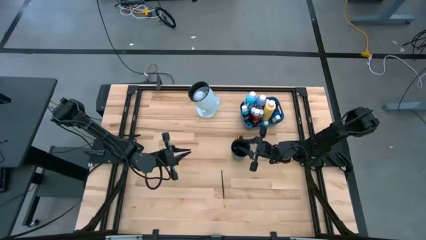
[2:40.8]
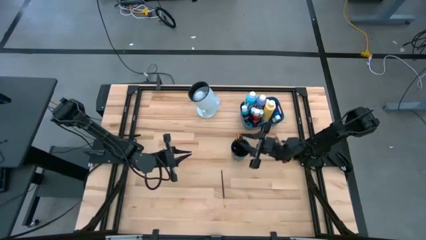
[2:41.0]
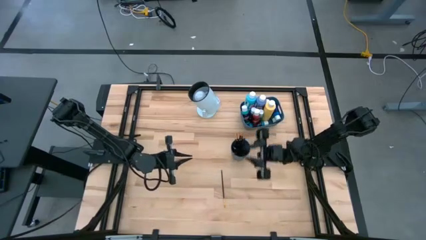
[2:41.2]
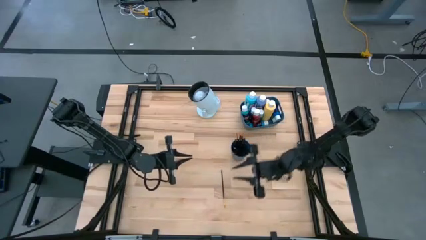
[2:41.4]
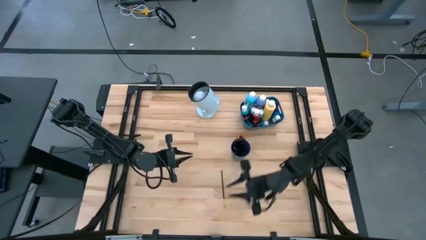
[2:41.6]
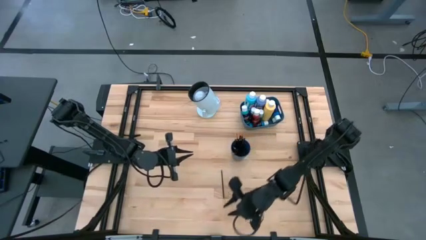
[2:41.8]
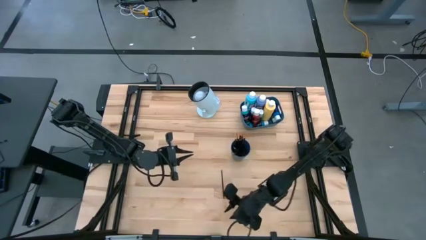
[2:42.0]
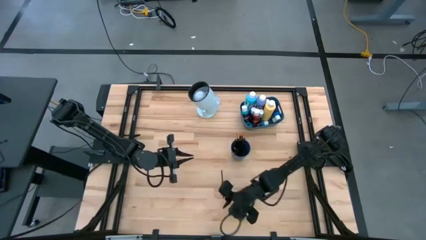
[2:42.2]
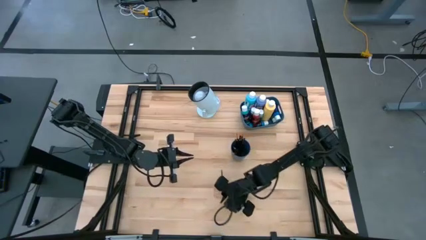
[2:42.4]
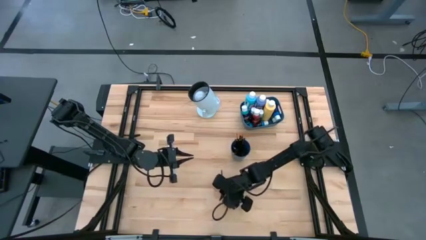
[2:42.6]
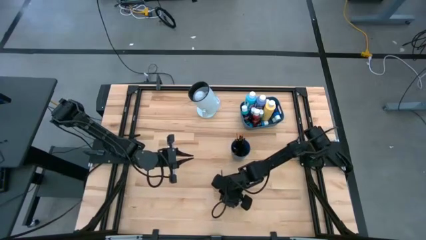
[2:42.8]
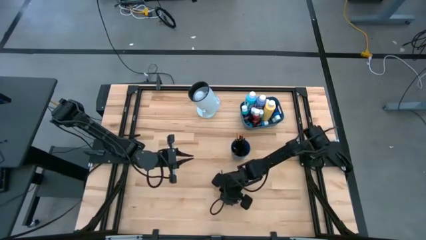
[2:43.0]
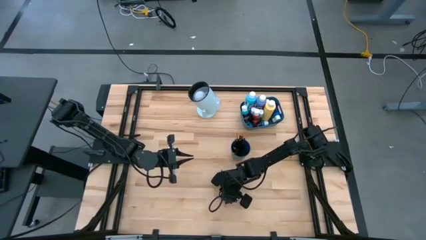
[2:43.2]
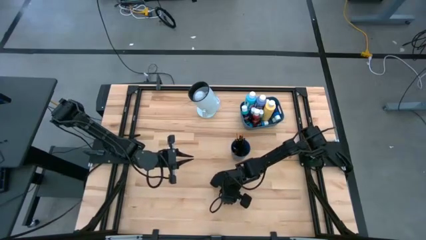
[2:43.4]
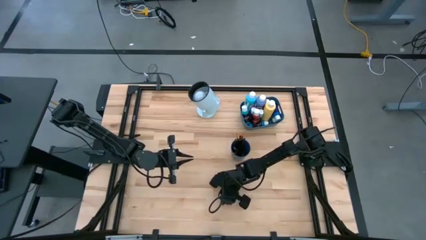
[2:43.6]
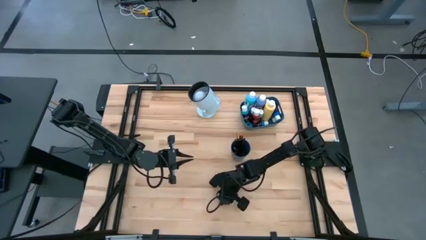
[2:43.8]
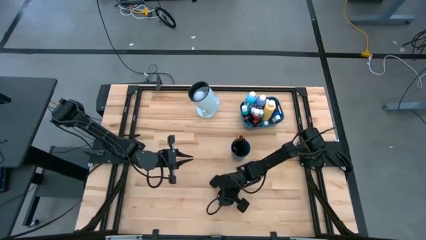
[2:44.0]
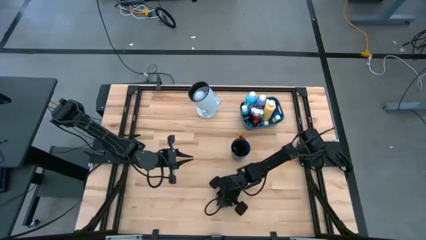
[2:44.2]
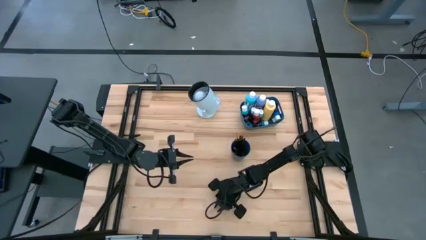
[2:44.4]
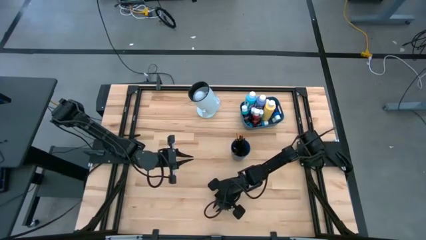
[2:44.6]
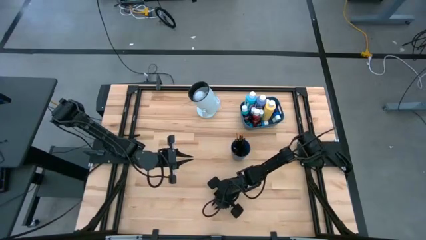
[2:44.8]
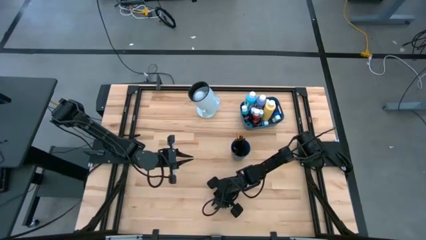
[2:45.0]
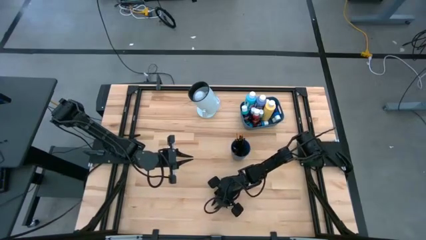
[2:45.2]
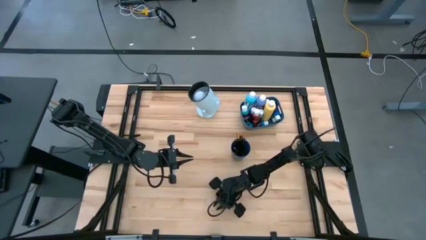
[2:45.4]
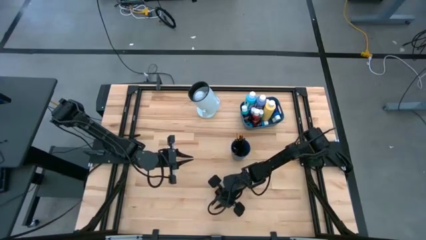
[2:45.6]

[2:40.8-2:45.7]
Task: Pick & Place Paint Supplies
Put the gold paintbrush into the blue cup

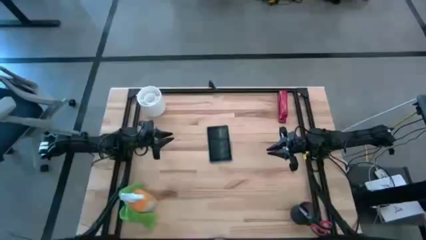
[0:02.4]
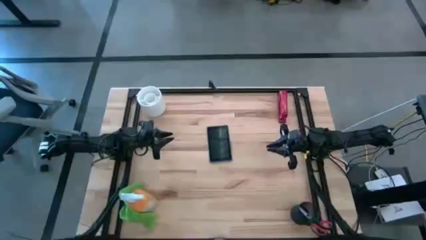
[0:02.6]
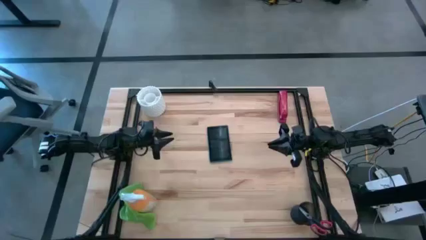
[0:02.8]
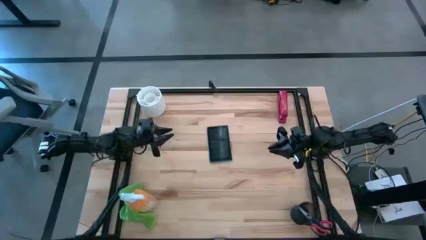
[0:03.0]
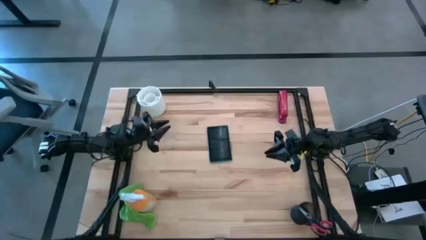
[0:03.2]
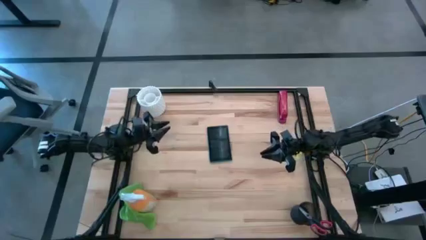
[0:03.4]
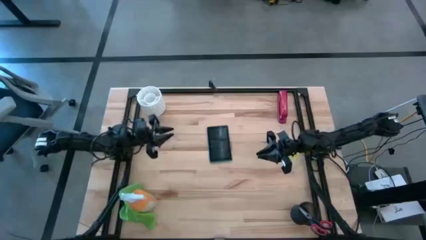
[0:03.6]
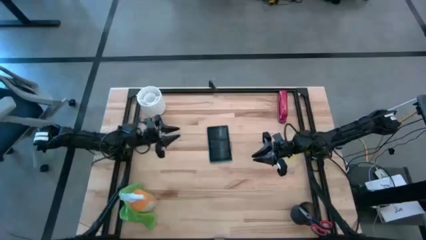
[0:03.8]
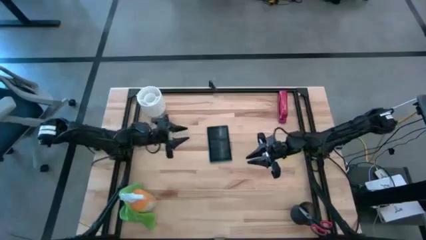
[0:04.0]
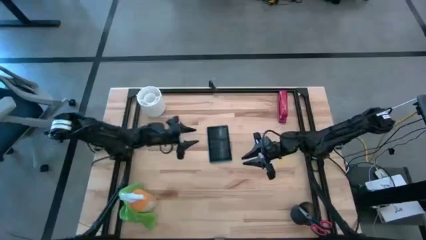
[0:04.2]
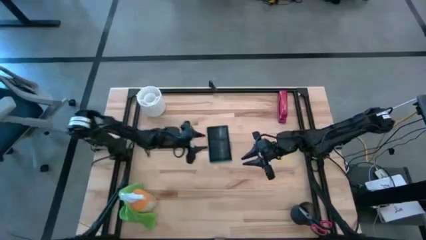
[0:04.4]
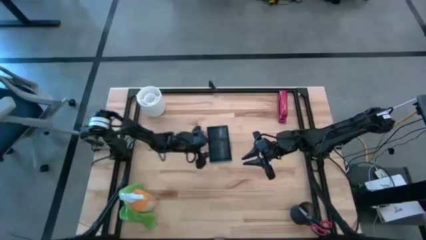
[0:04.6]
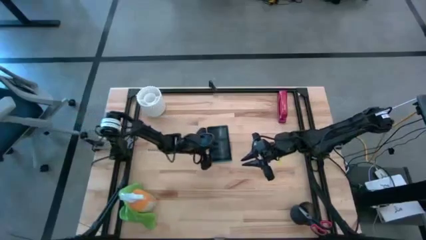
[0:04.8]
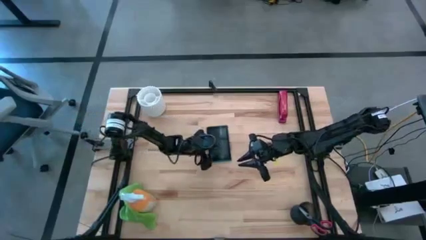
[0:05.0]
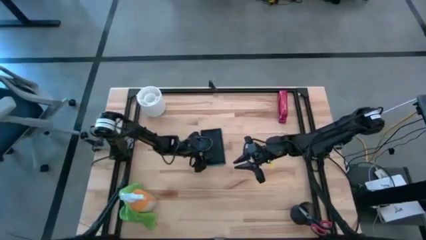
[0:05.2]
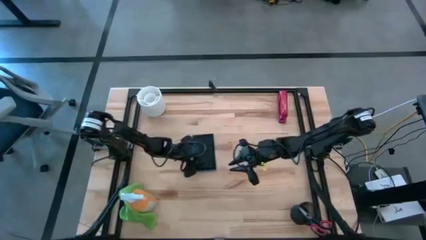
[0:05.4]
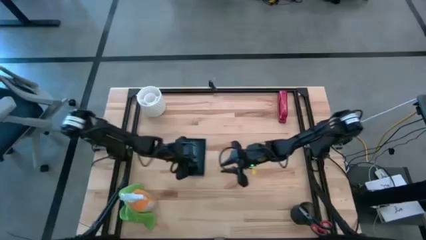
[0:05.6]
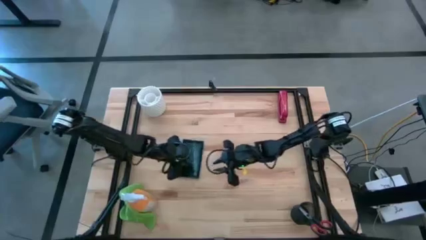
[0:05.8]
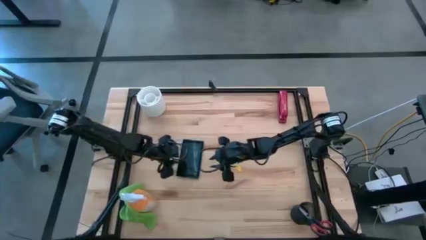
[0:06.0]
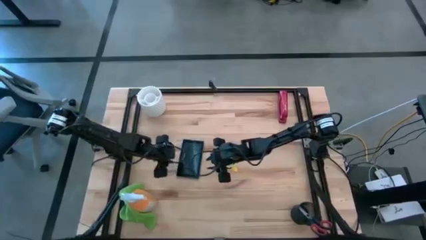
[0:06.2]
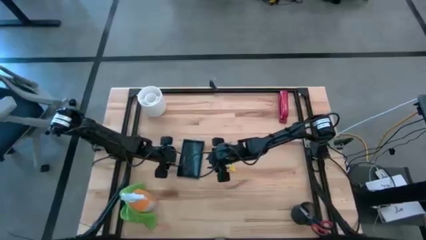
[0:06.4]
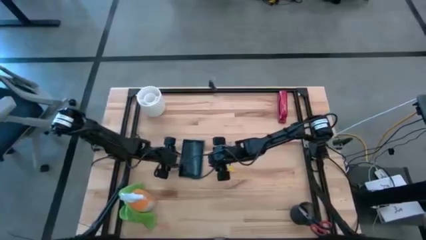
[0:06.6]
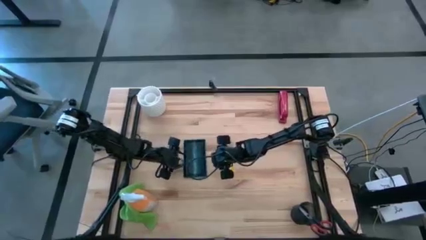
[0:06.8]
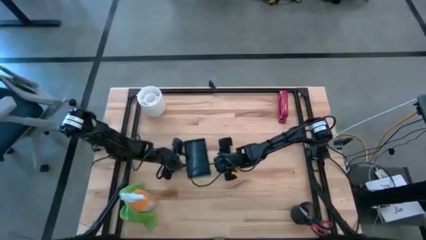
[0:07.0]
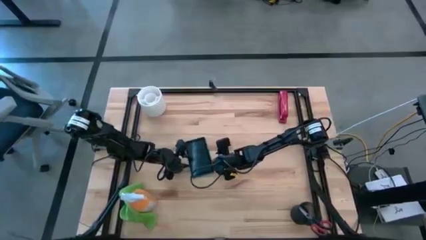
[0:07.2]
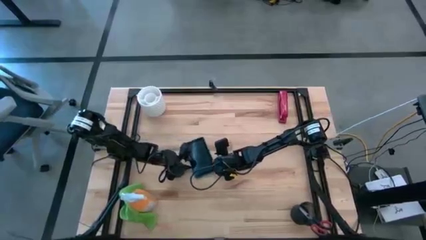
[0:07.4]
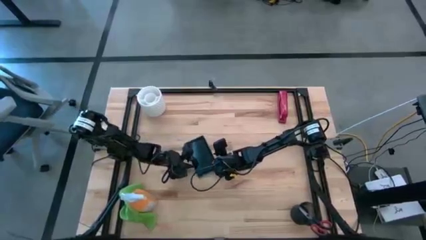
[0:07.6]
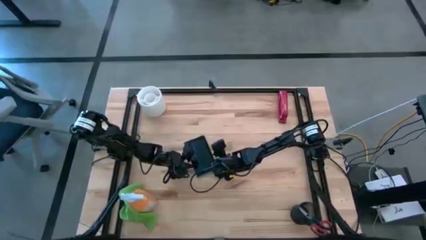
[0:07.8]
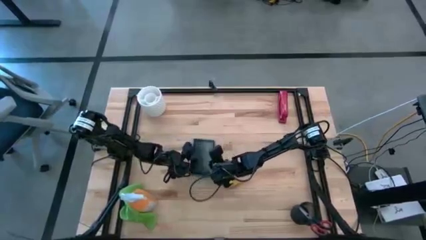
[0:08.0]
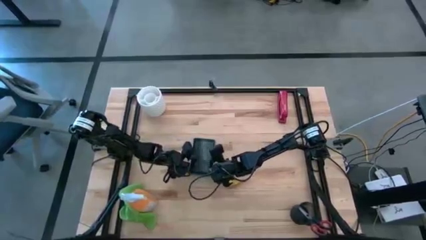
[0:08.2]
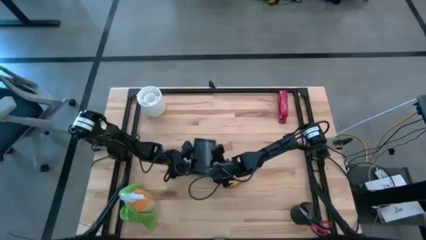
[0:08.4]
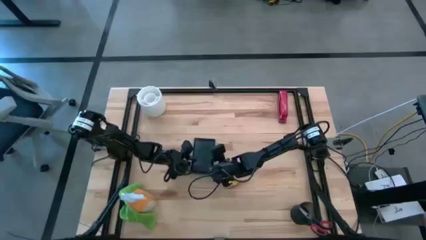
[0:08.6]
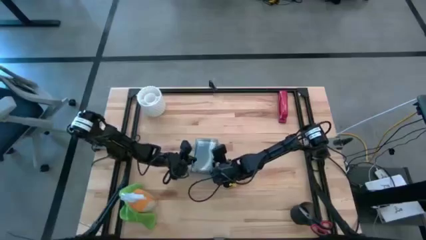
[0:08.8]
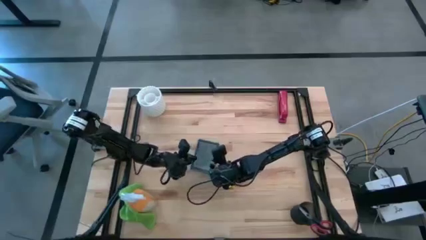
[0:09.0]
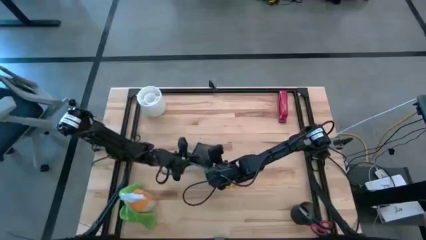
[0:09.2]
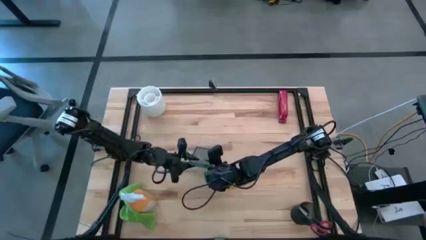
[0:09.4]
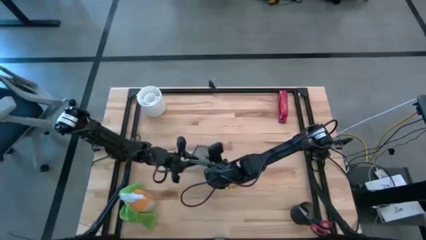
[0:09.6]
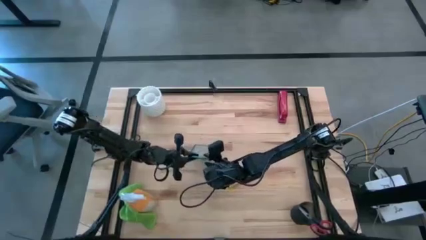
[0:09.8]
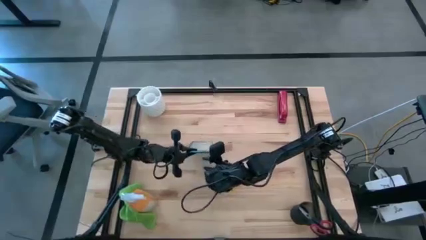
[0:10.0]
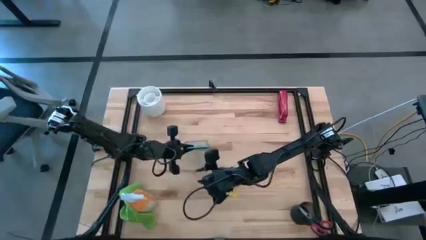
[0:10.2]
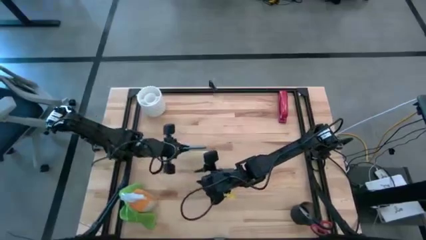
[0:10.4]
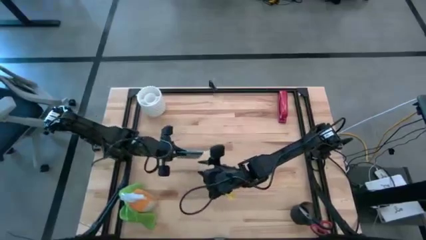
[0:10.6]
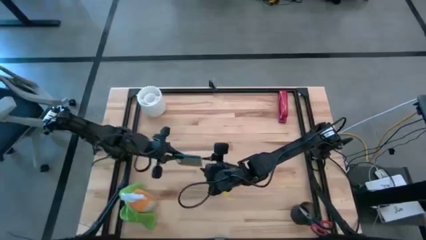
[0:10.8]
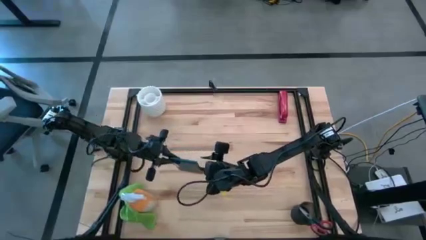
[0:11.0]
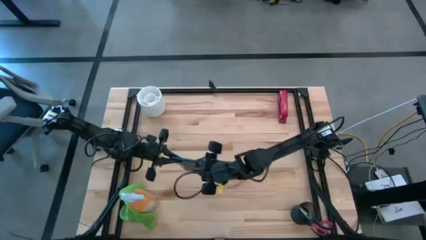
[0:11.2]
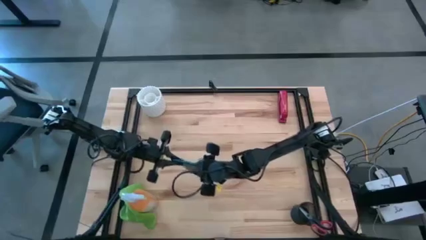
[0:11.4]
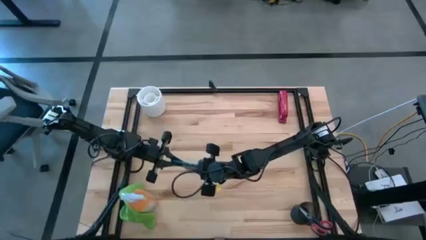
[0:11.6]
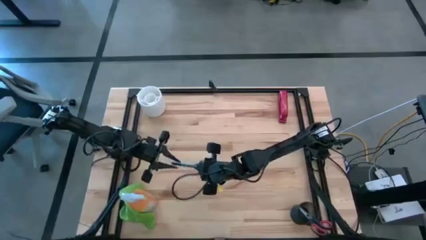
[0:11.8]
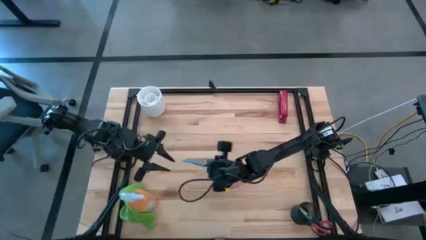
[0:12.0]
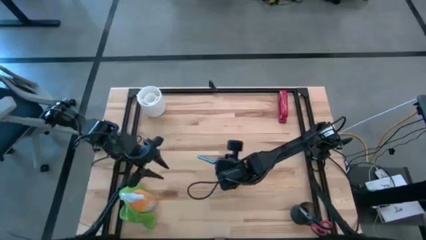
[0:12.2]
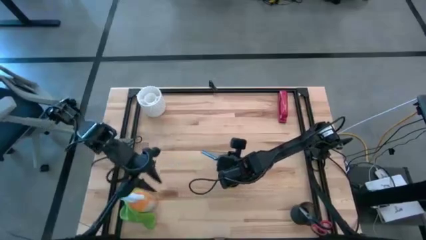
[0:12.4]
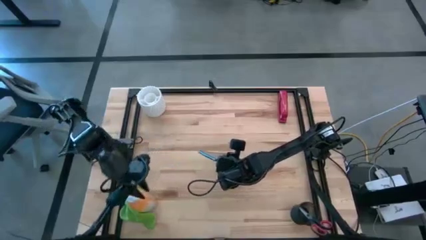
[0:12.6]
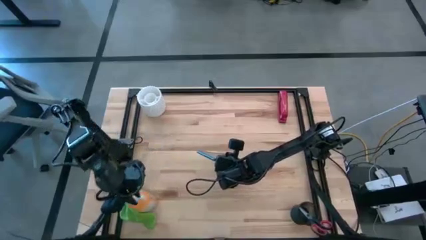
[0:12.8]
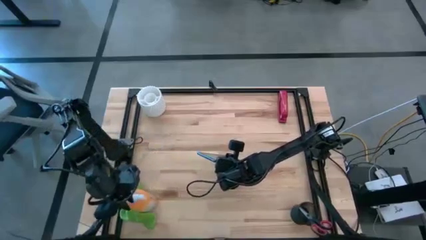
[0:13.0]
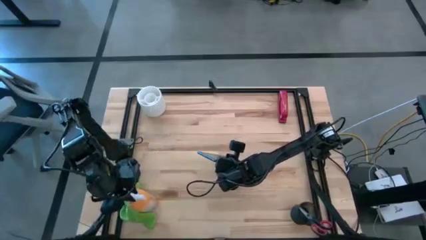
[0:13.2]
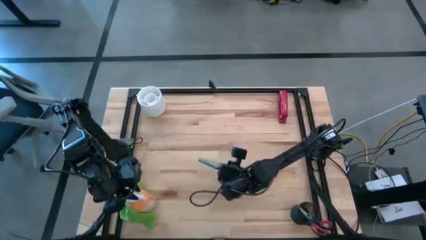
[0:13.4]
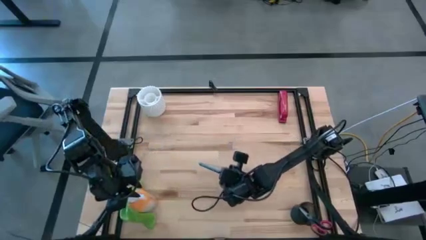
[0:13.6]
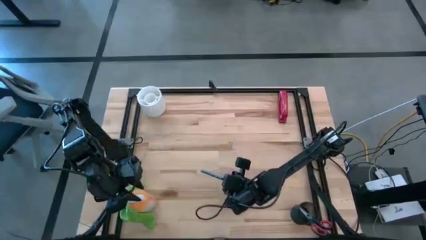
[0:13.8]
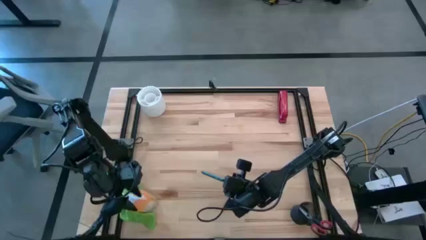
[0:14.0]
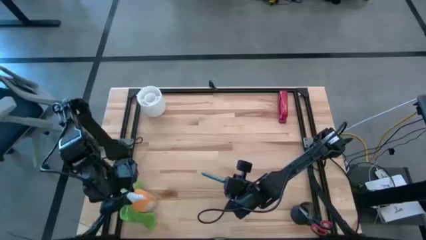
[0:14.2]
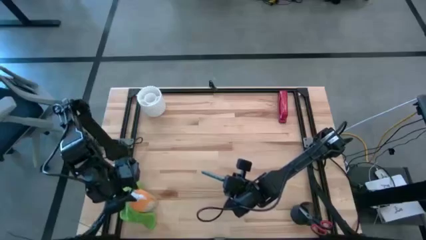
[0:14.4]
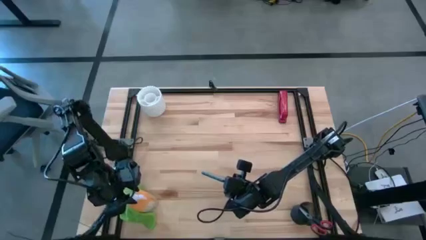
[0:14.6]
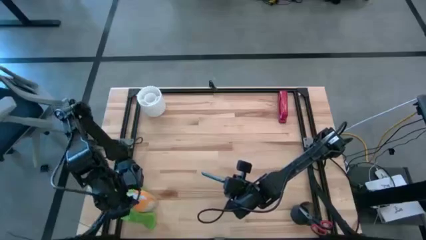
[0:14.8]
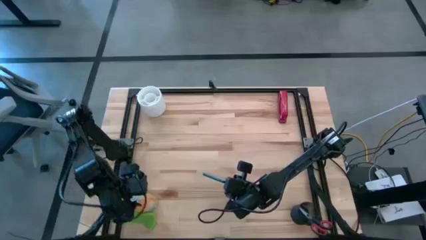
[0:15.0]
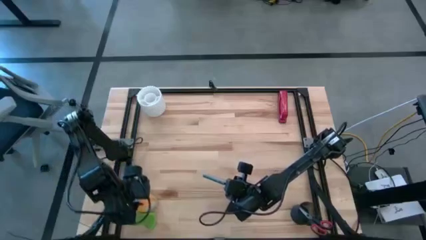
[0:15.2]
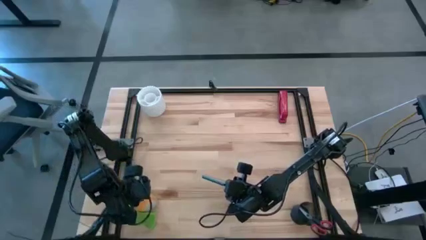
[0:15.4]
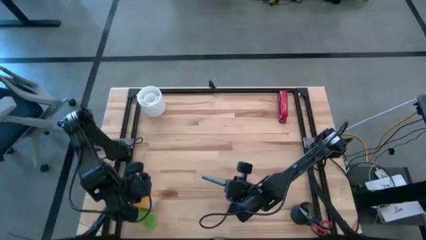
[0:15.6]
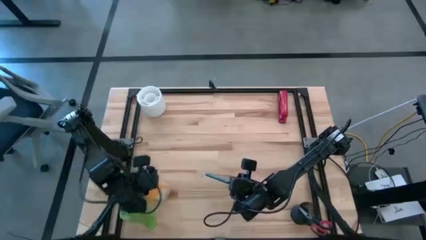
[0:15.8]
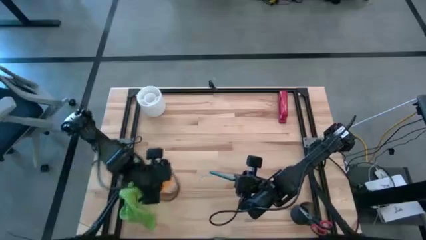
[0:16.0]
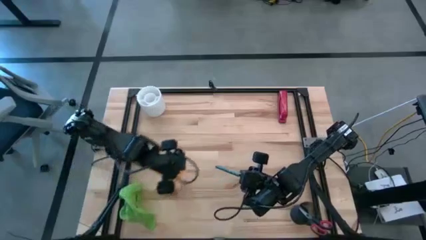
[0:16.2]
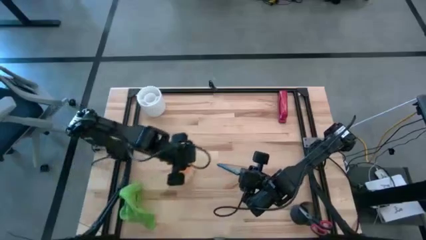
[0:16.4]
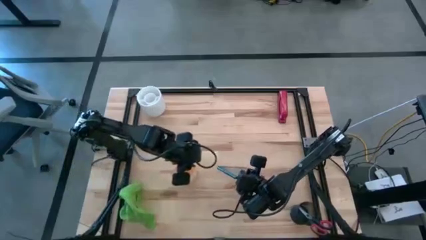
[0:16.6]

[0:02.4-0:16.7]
Task: Apply microfiber cloth
Spray the blue tablet with the orange spray bottle
